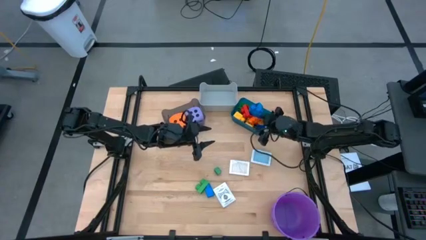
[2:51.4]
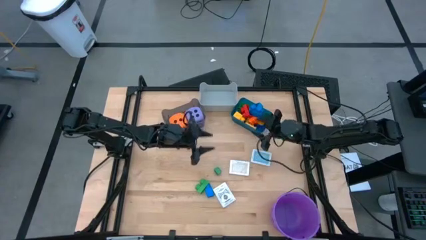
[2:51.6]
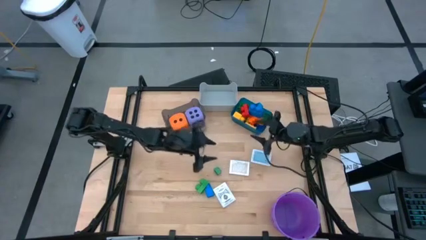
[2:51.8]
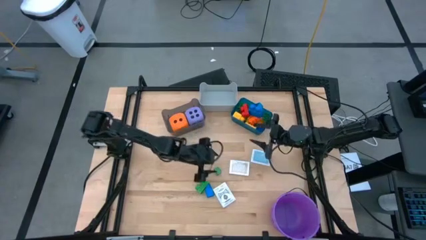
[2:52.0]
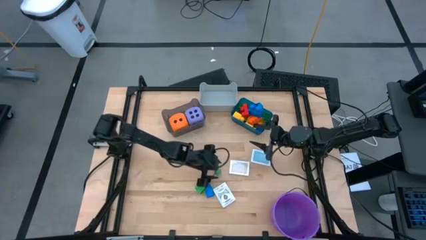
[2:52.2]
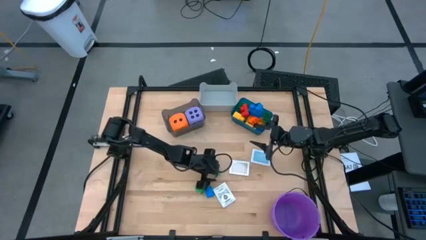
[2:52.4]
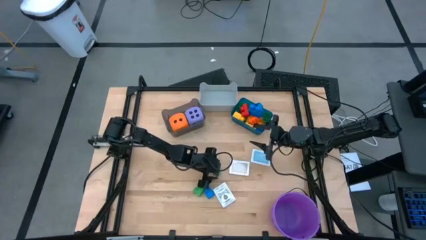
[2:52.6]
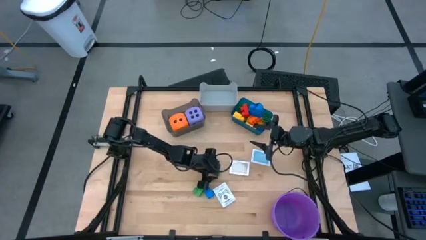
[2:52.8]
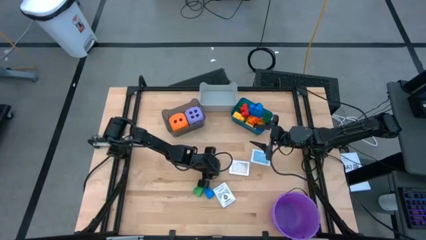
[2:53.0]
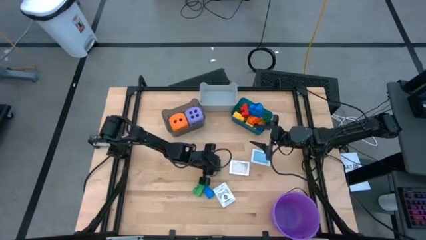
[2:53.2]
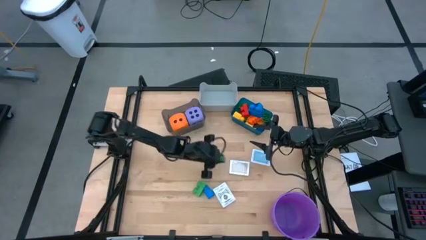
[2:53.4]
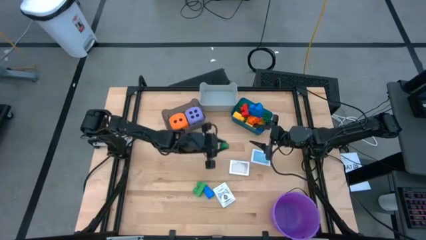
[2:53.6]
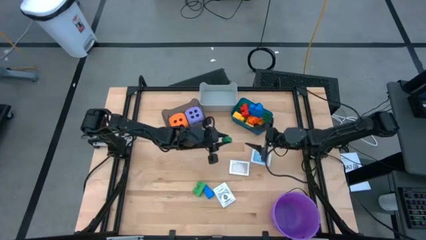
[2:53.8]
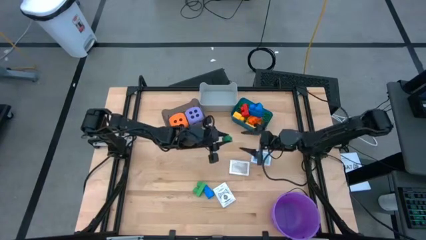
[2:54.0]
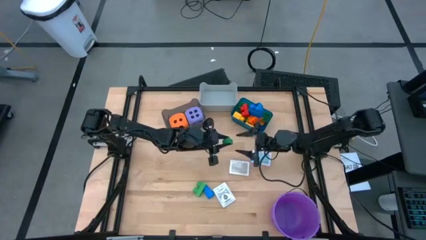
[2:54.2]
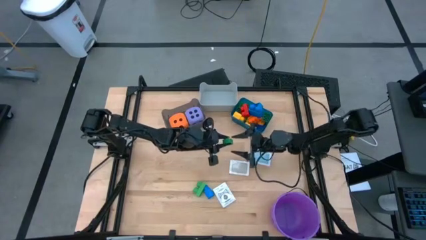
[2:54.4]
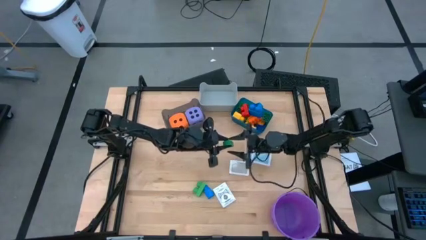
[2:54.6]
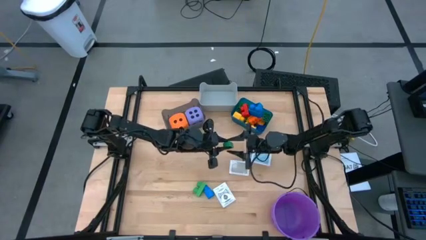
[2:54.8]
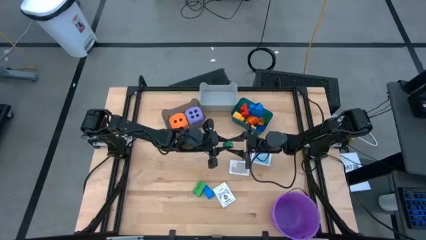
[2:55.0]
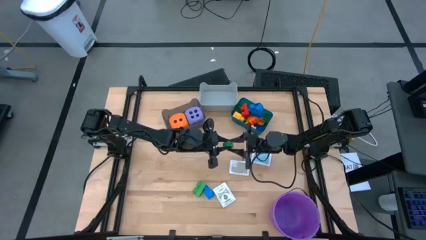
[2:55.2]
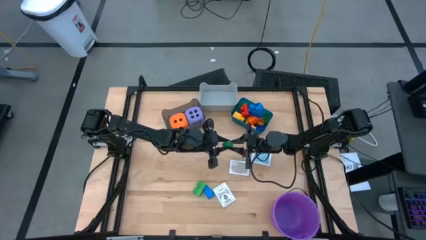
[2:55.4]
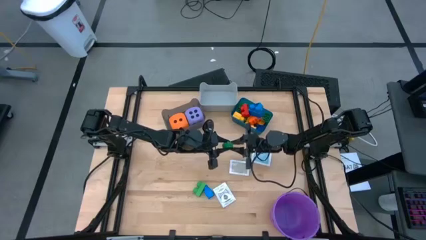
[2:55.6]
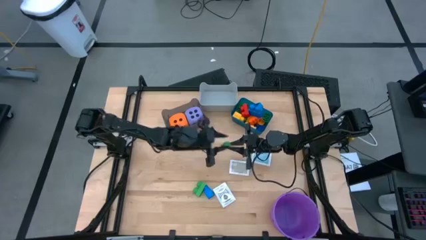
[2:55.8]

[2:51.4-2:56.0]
Task: Pick & Place Toys
Put the green 4 studs game piece into the blue bin

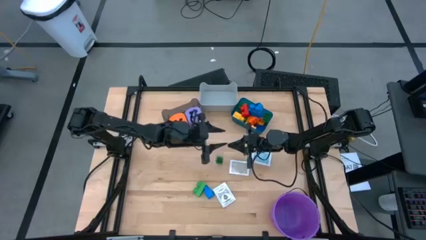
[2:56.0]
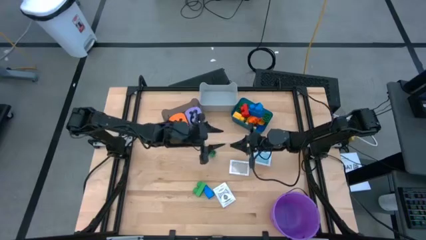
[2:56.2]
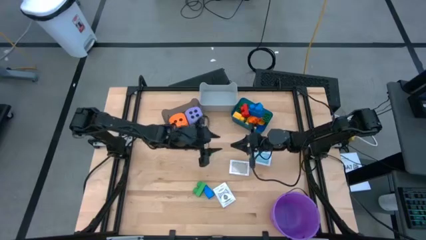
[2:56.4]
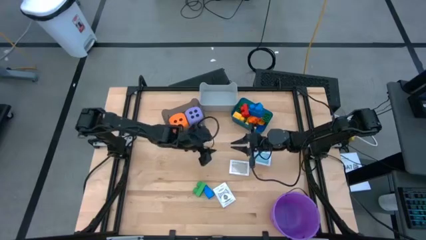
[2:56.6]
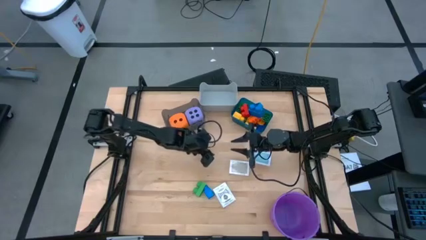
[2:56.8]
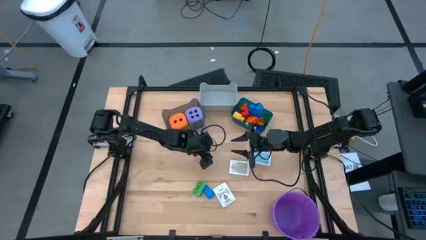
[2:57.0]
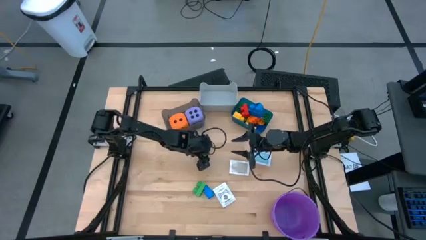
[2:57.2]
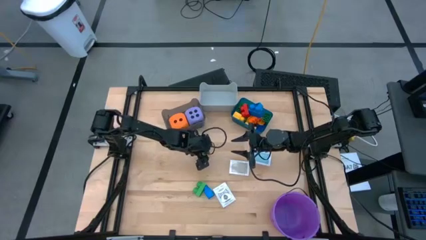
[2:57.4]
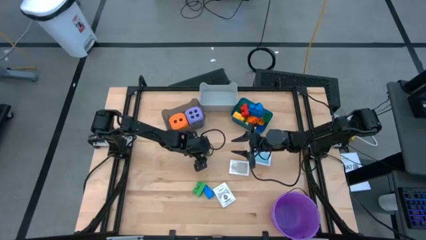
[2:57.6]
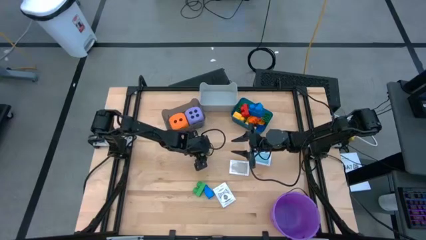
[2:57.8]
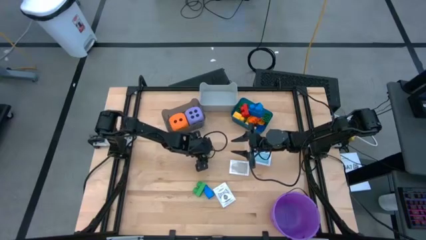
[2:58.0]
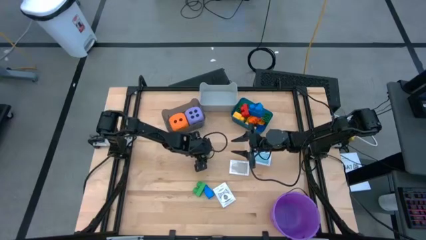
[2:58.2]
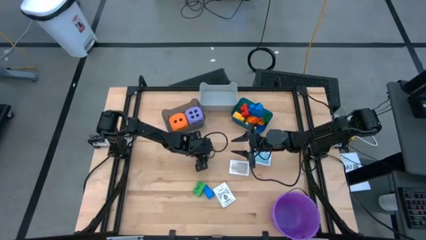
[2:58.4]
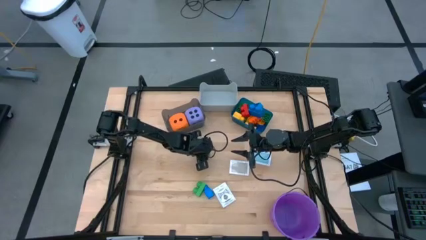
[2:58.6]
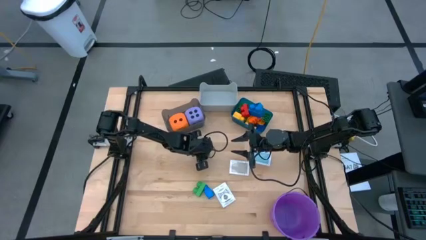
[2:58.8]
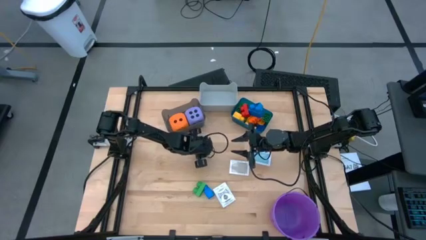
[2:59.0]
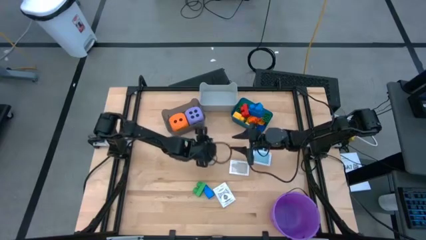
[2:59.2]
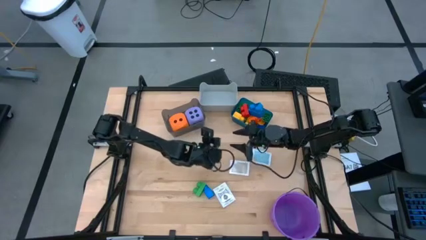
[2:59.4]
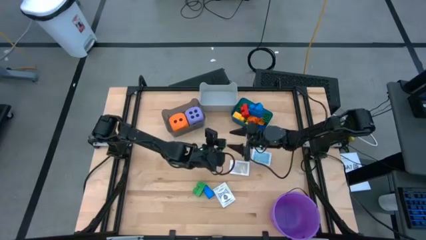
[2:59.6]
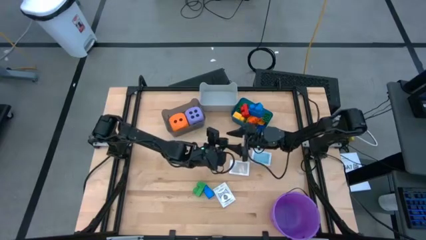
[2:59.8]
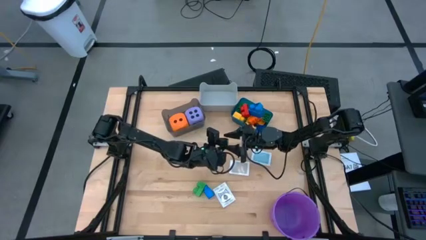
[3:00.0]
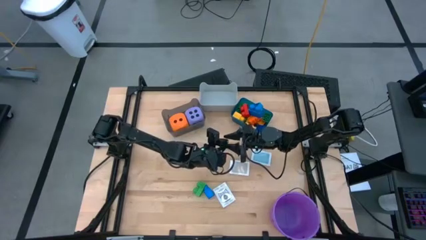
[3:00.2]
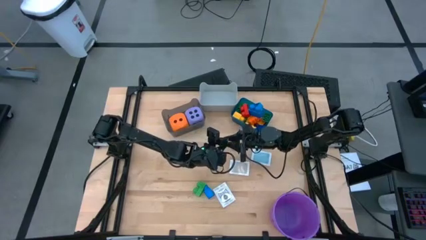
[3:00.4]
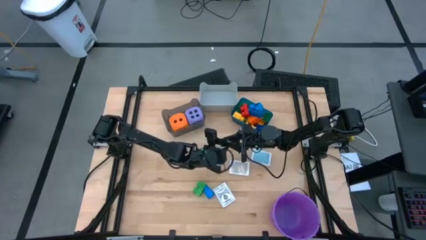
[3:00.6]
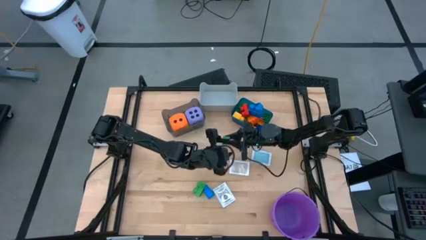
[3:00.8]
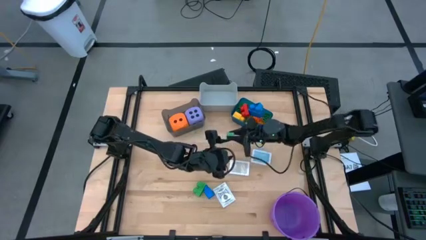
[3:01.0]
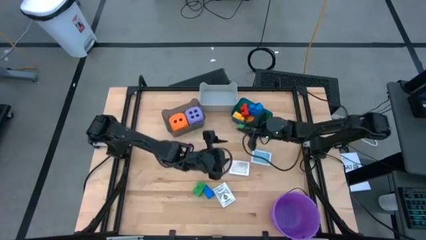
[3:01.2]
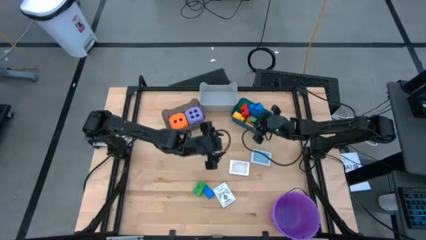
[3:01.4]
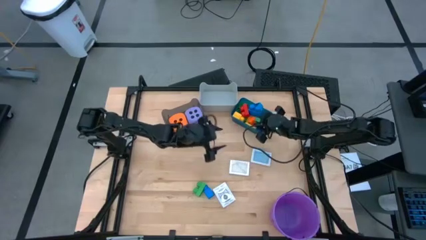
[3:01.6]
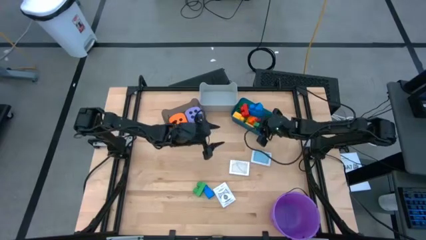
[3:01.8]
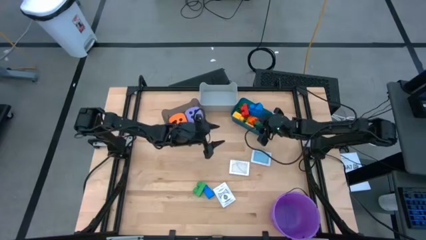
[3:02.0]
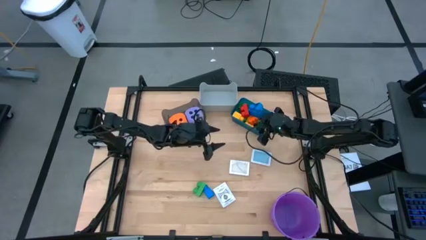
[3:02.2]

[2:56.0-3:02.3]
Put the green 4 studs game piece into the blue bin

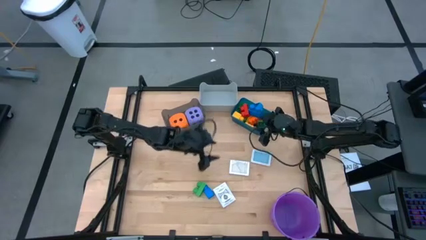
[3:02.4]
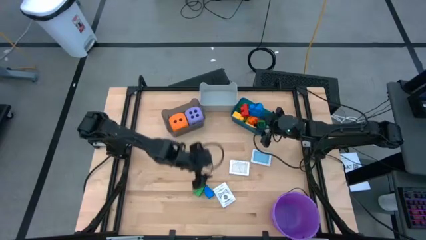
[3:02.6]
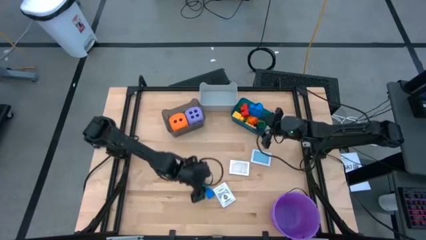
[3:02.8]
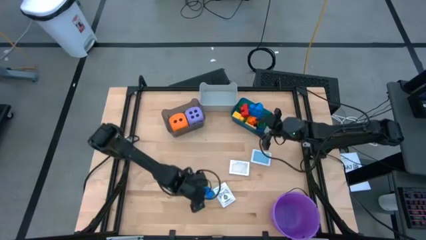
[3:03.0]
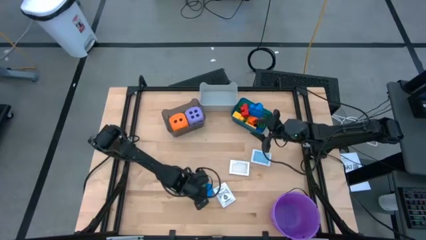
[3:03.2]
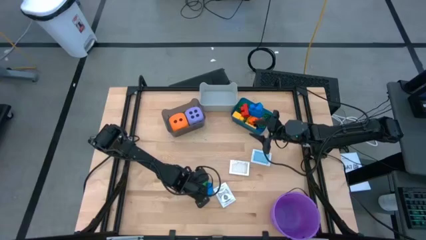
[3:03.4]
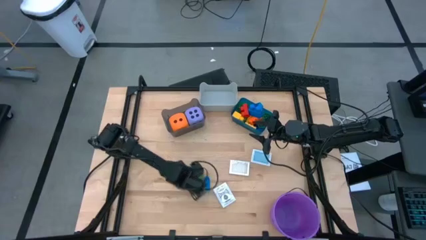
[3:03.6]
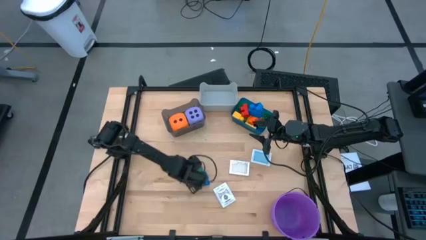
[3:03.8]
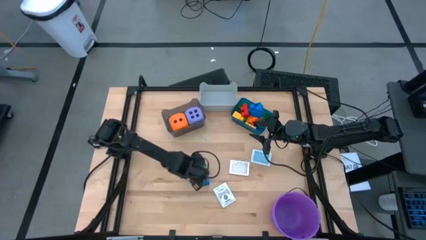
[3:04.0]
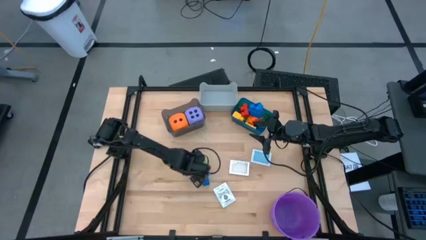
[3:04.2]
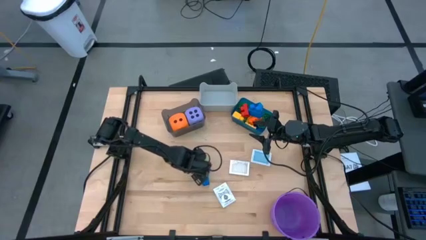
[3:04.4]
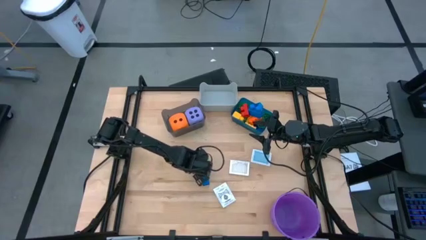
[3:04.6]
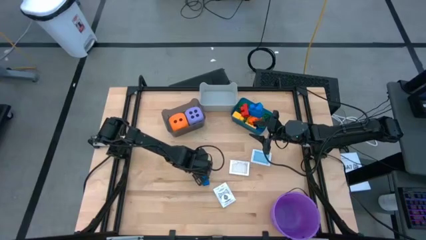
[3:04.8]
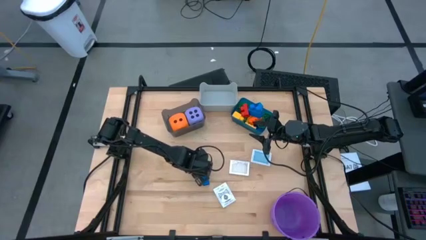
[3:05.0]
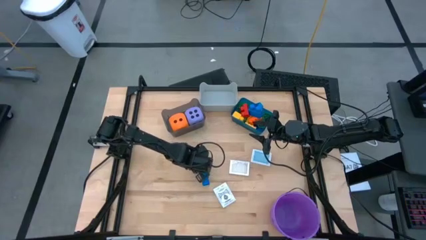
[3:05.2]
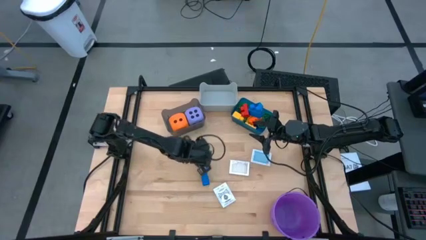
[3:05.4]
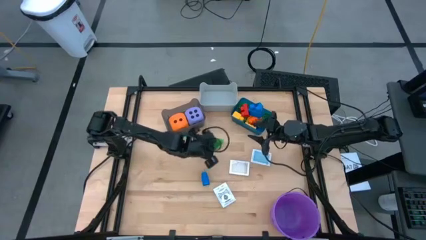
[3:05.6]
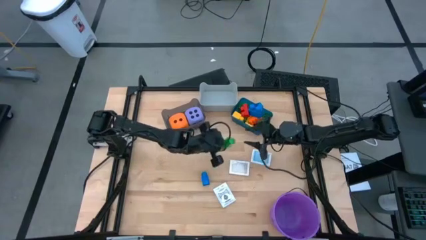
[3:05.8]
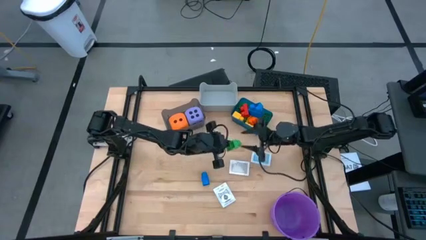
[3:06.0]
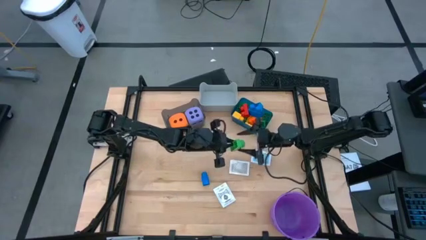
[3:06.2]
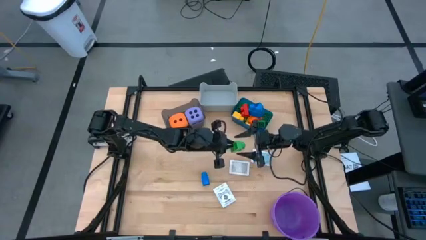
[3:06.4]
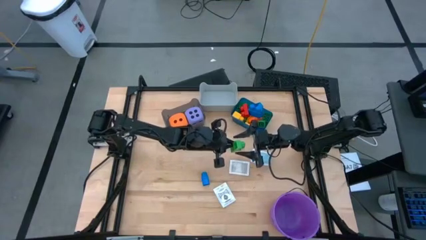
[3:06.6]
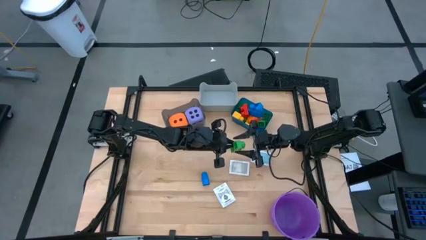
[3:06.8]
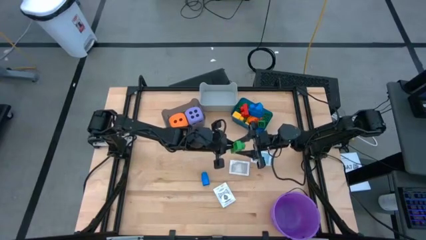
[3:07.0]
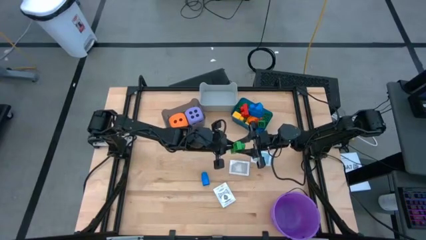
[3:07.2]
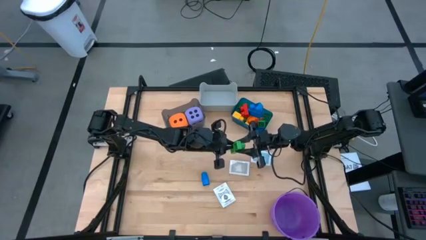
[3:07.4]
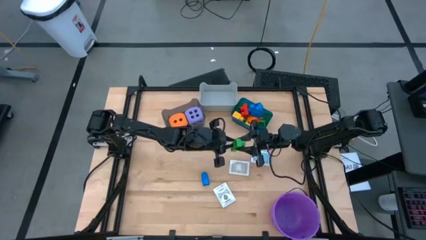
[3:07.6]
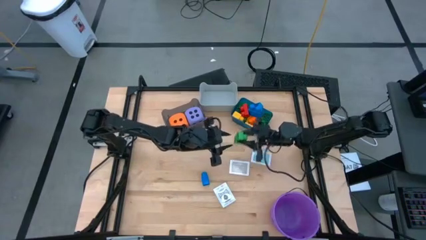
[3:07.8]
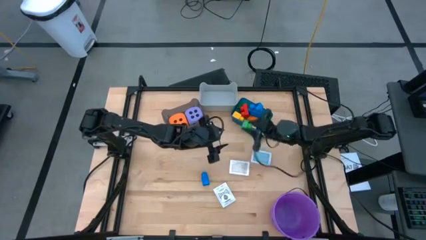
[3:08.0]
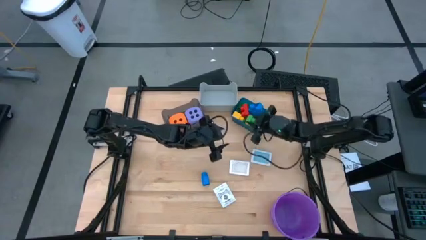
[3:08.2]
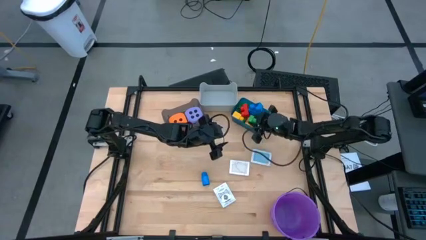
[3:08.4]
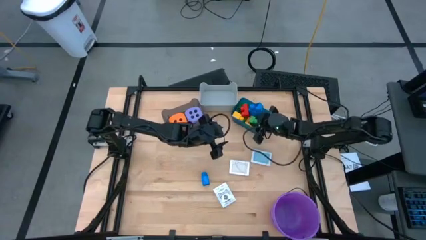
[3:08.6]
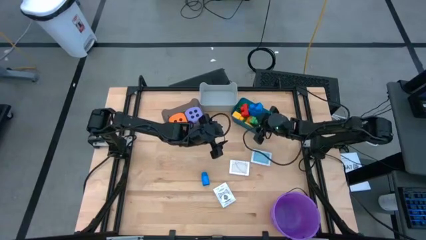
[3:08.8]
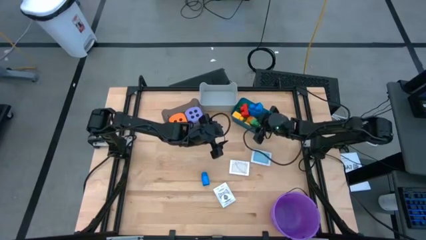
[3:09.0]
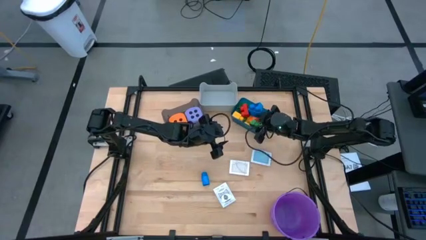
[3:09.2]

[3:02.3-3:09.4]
Put the green 2 studs game piece into the blue bin
